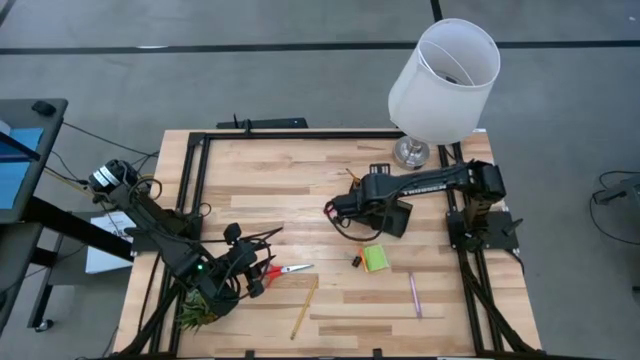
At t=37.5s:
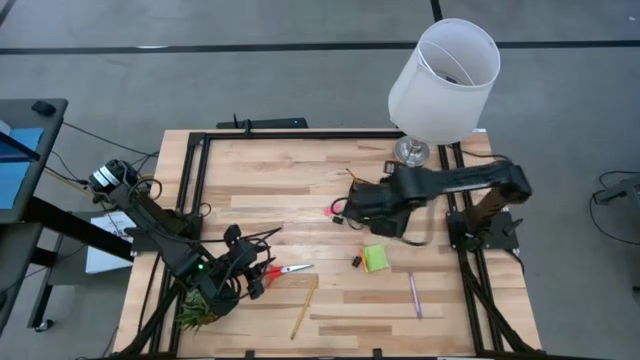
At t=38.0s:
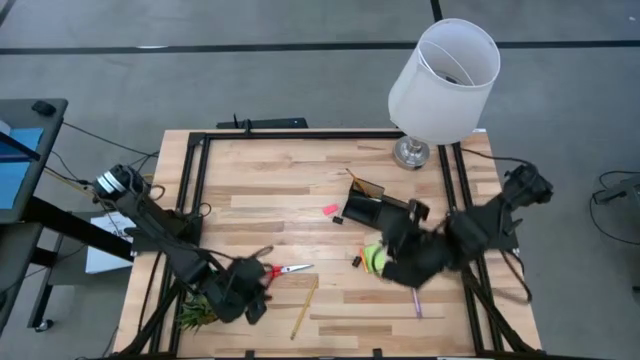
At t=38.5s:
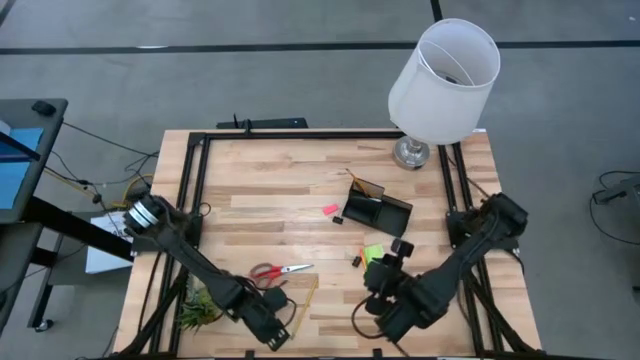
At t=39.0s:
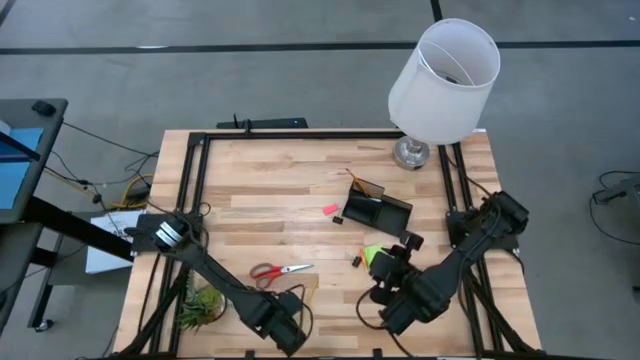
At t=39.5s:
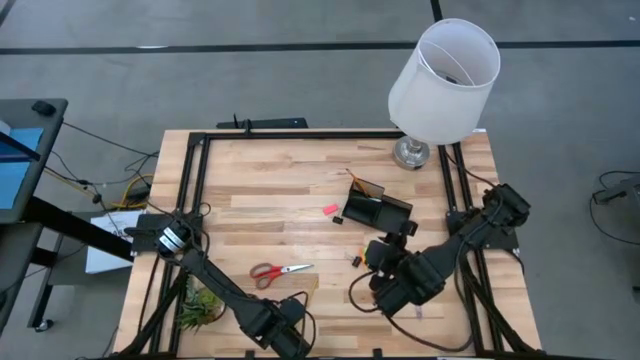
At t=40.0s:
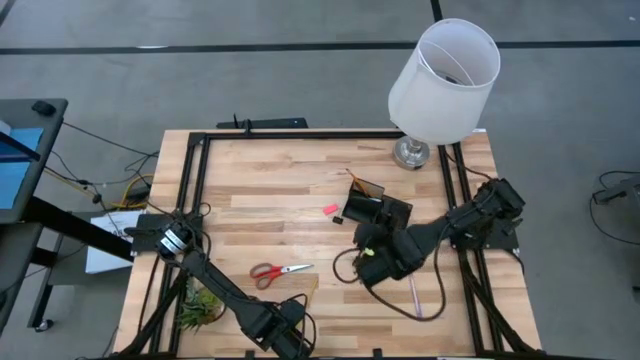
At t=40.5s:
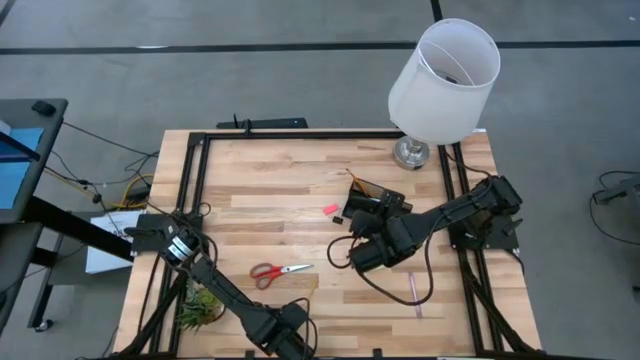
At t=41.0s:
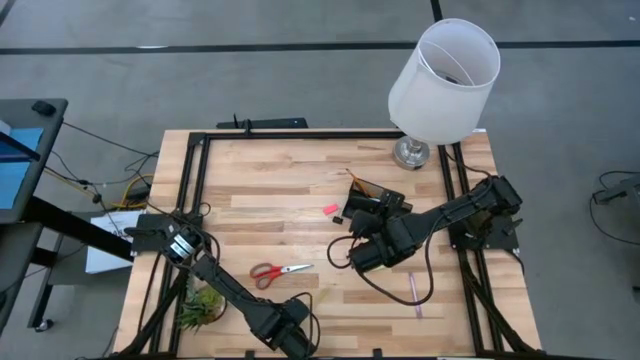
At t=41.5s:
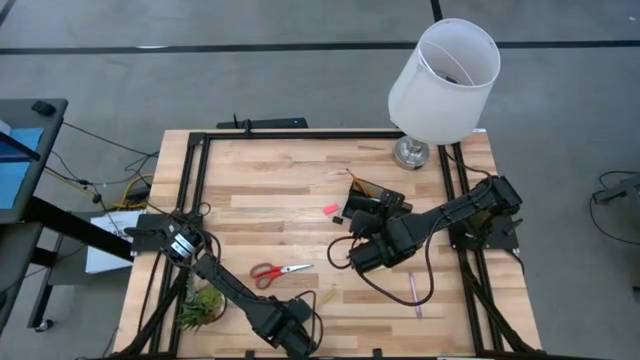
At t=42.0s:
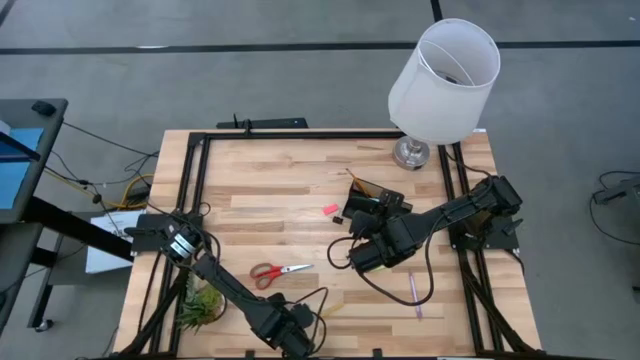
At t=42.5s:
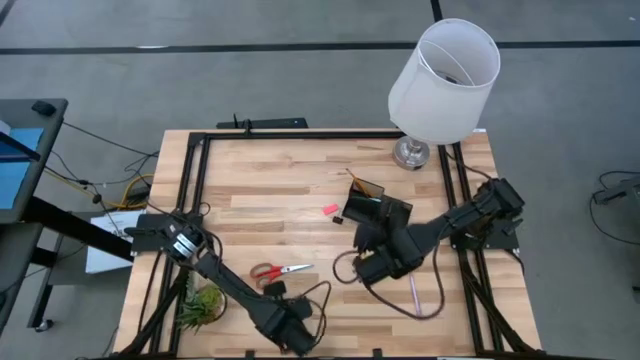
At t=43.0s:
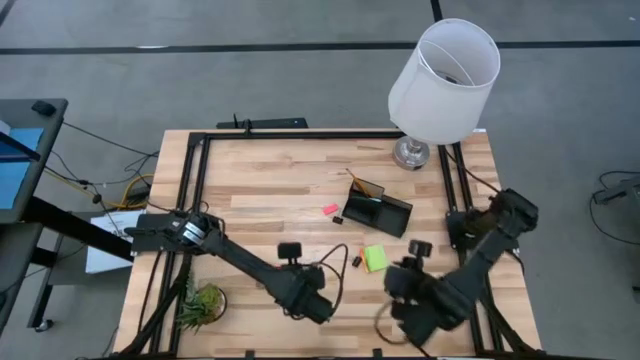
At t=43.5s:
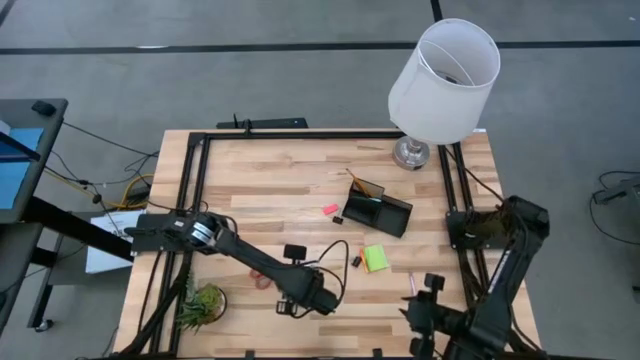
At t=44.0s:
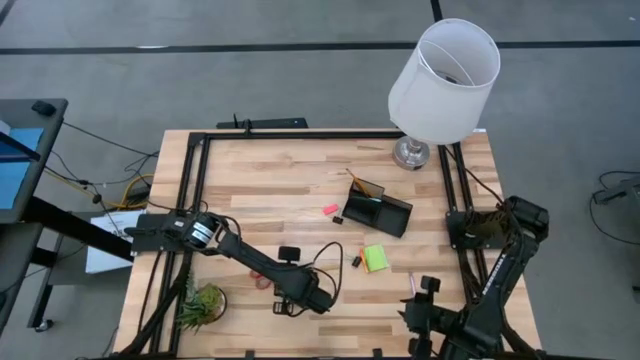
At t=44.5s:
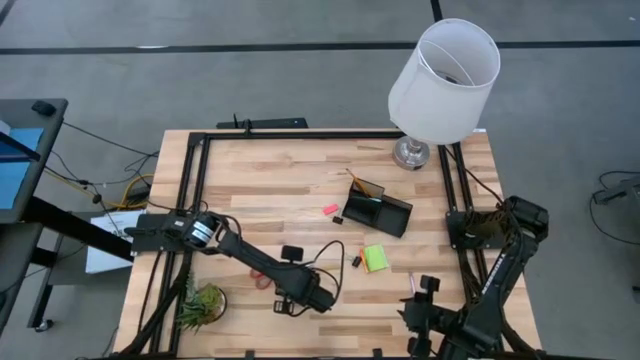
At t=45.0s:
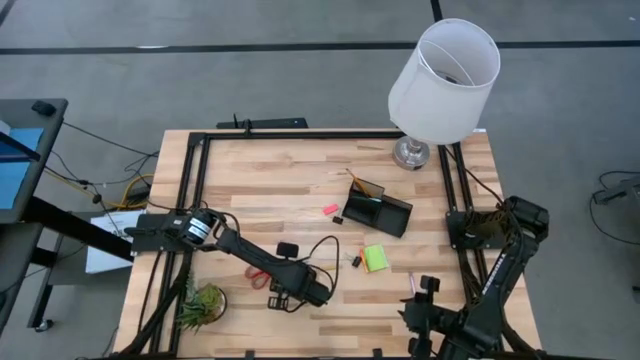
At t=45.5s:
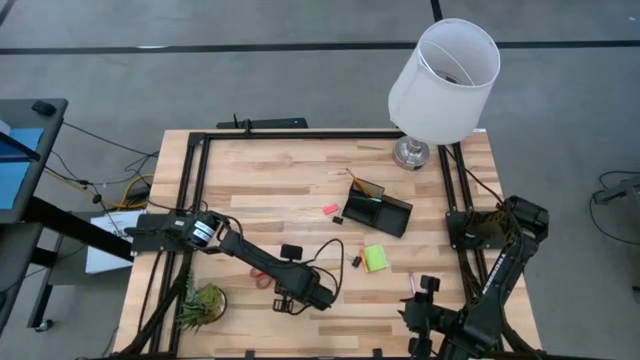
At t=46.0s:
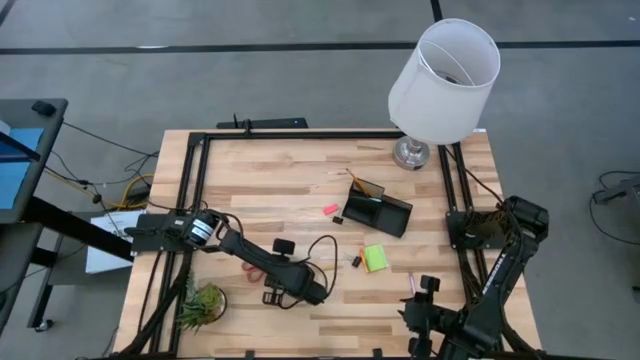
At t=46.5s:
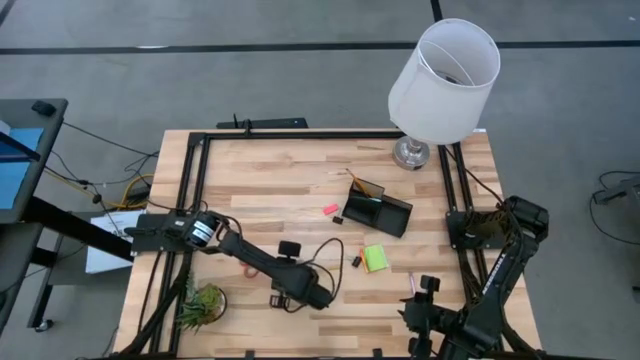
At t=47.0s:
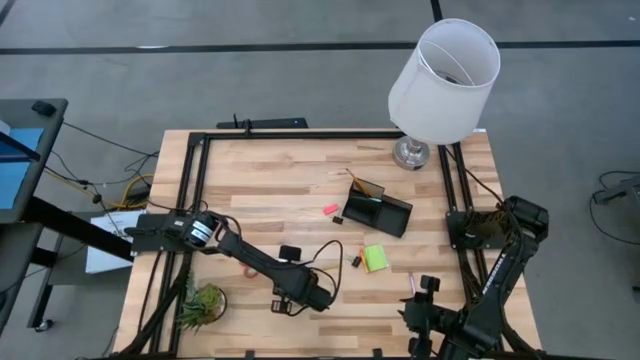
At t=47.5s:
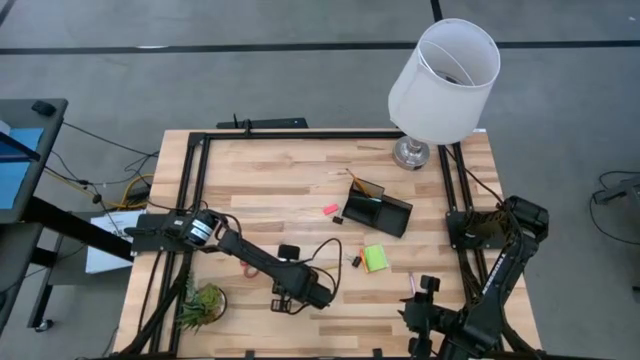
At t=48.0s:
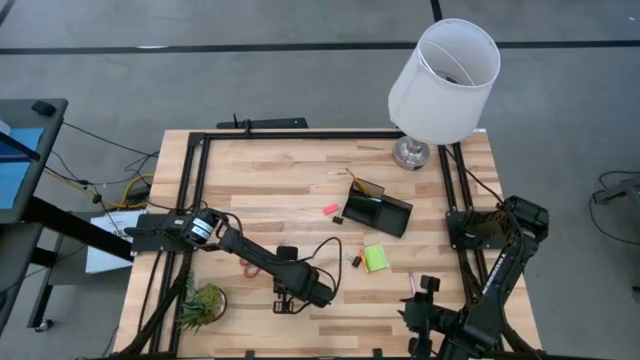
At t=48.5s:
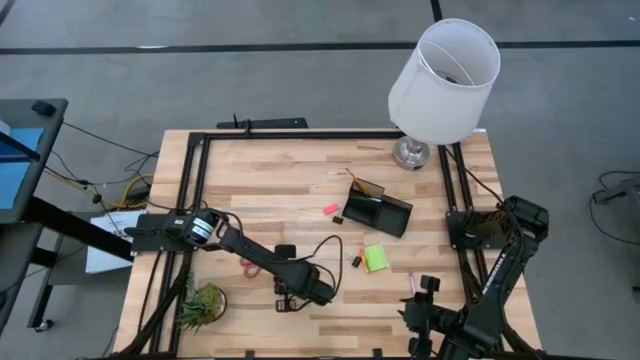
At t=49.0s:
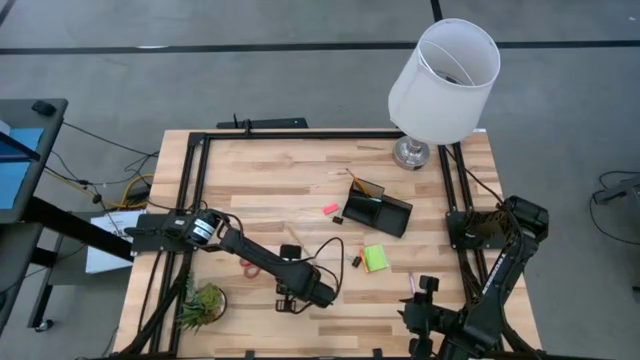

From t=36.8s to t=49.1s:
Task: Pick and place office supplies into organizer
Put the yellow pencil into the desk organizer

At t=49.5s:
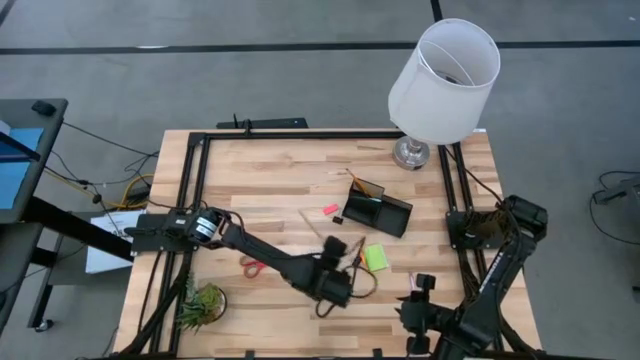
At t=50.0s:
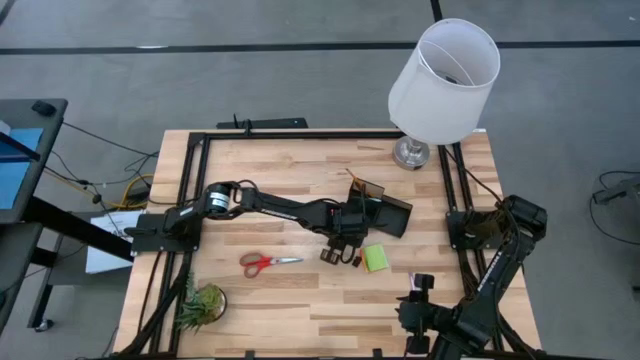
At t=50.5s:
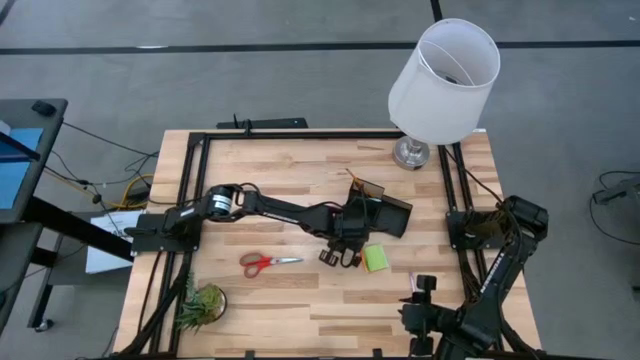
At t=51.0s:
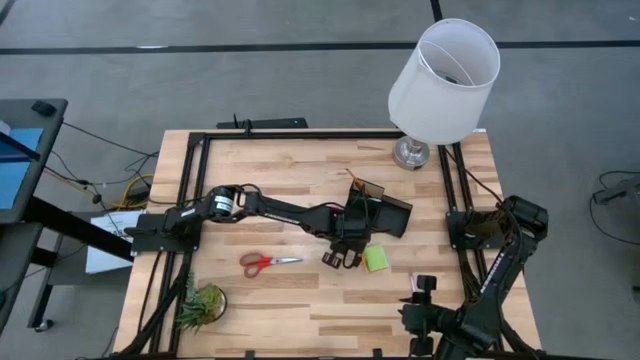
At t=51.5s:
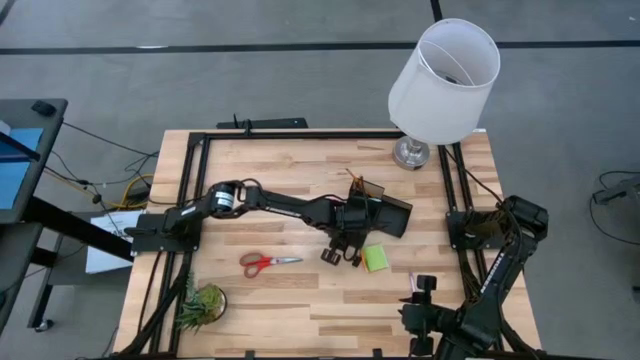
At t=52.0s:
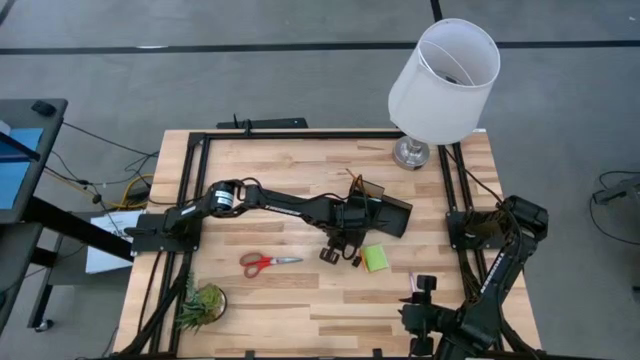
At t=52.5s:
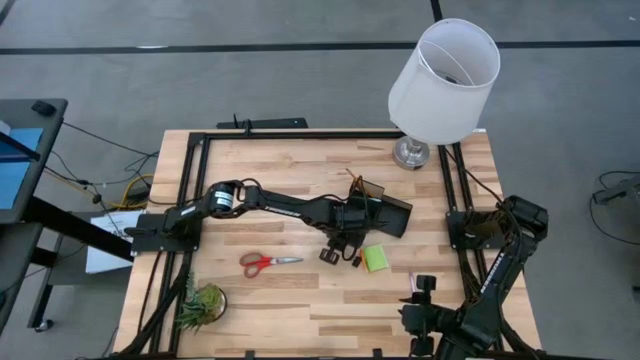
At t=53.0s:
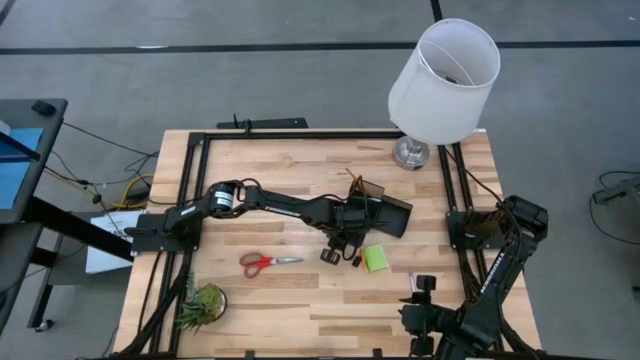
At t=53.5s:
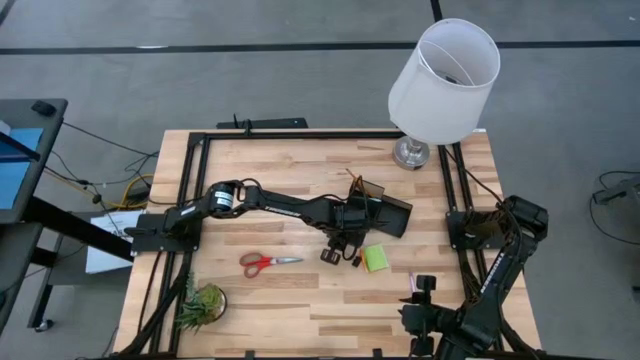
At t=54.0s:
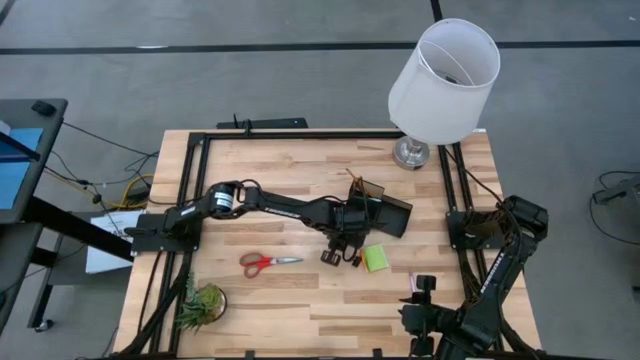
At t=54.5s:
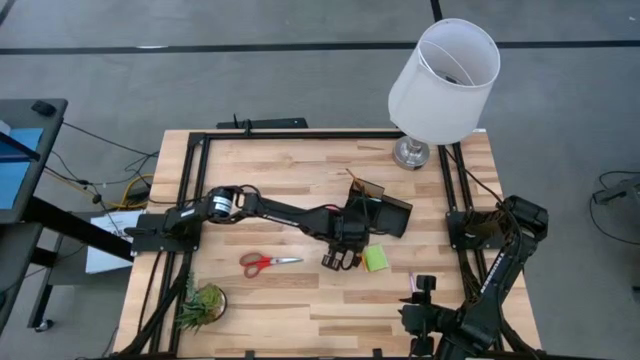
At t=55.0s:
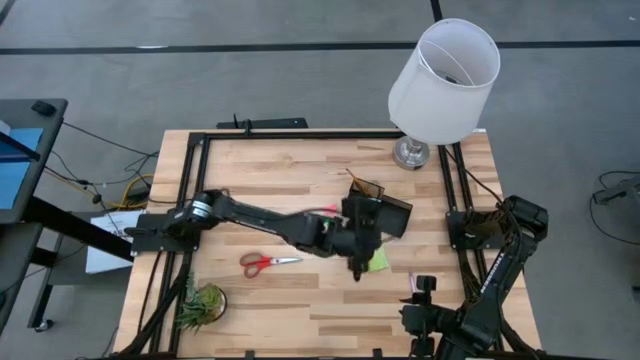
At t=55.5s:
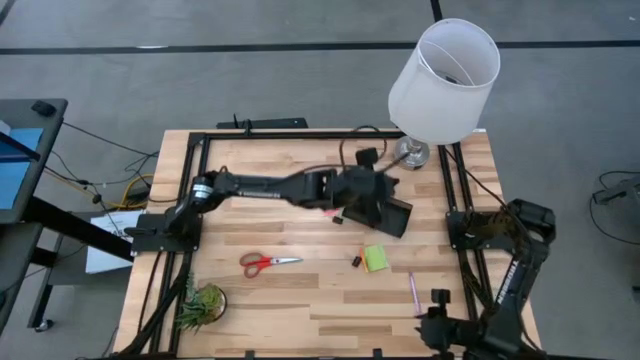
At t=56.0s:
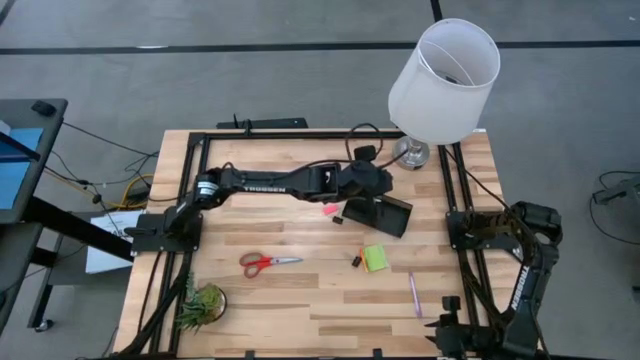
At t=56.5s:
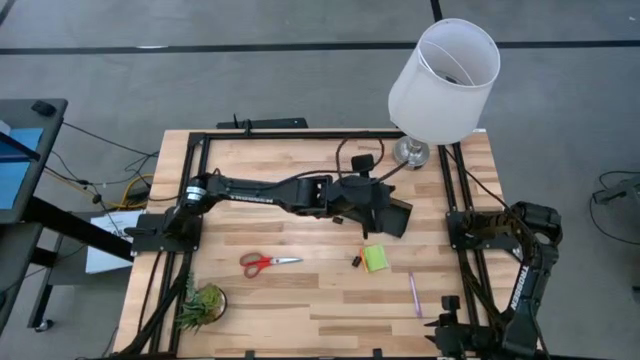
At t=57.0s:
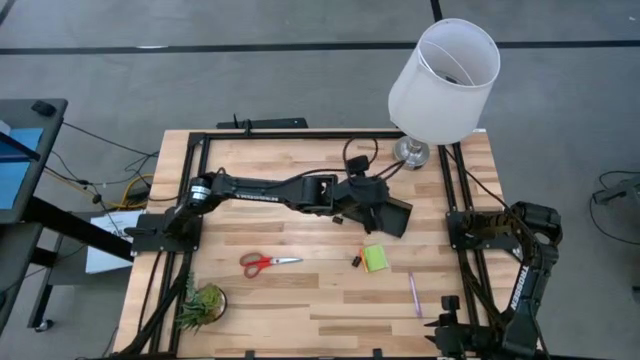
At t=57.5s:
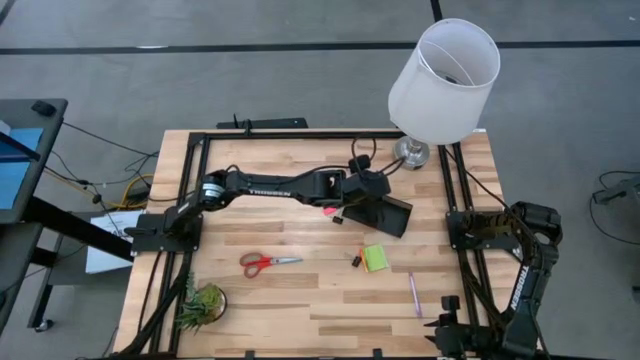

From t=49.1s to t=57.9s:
Put the yellow pencil into the desk organizer
